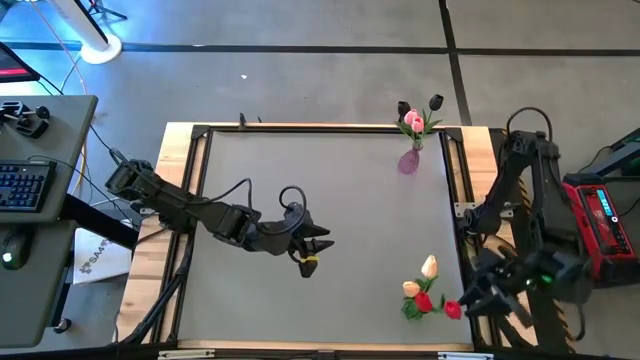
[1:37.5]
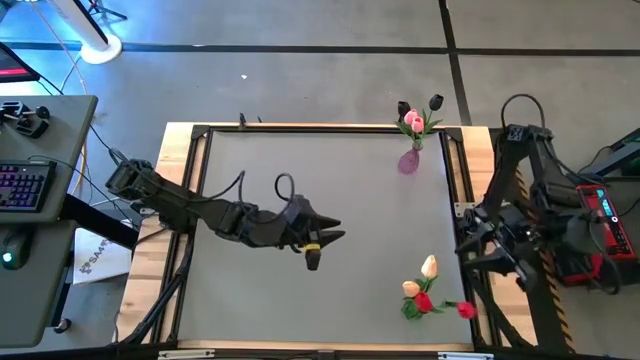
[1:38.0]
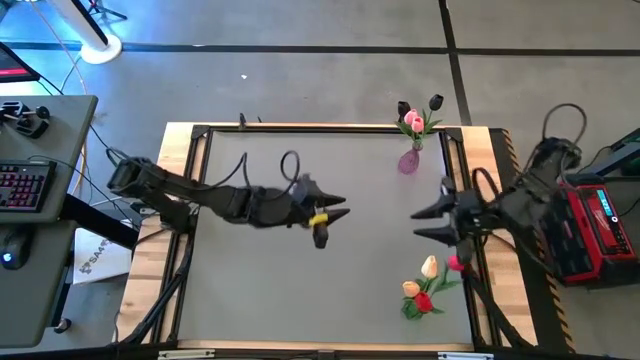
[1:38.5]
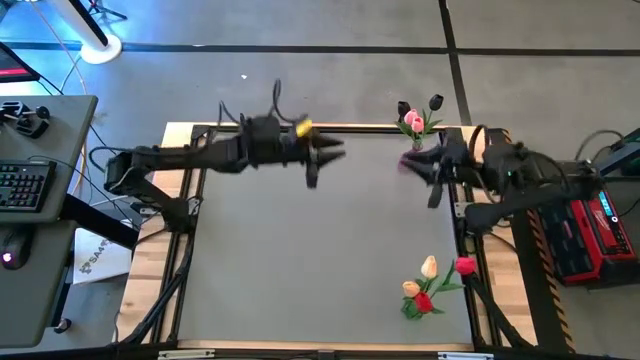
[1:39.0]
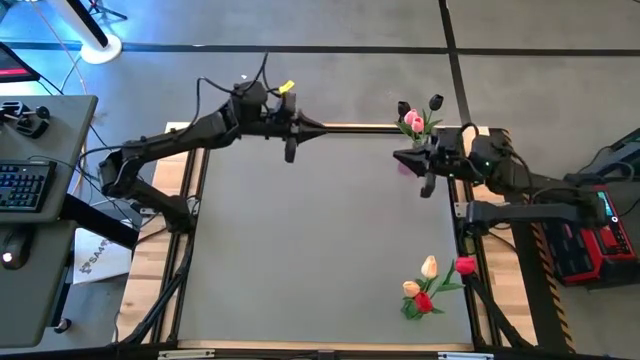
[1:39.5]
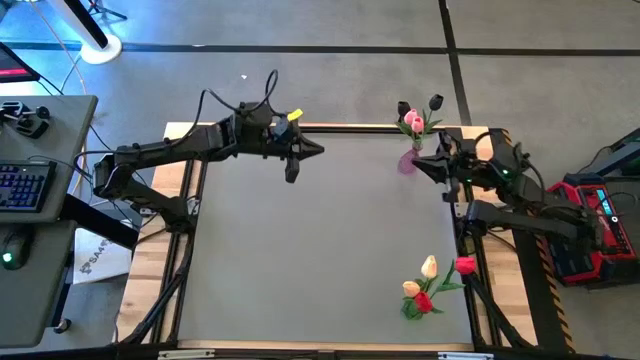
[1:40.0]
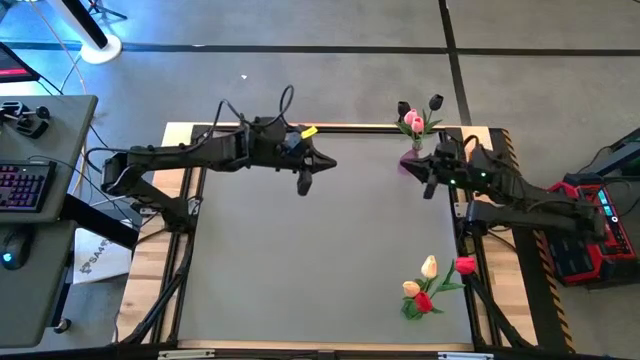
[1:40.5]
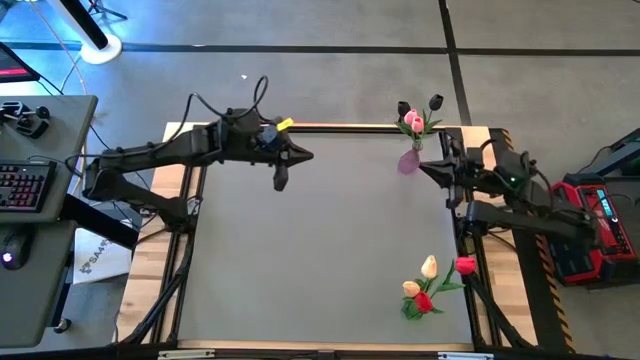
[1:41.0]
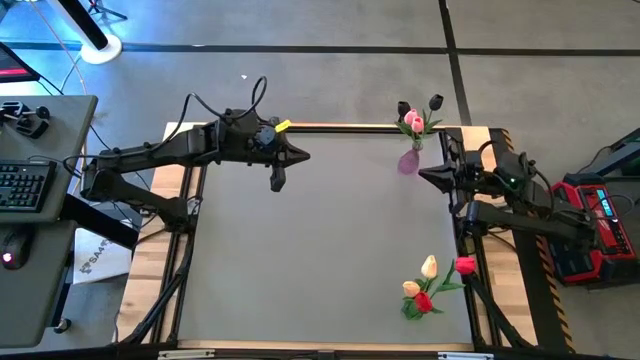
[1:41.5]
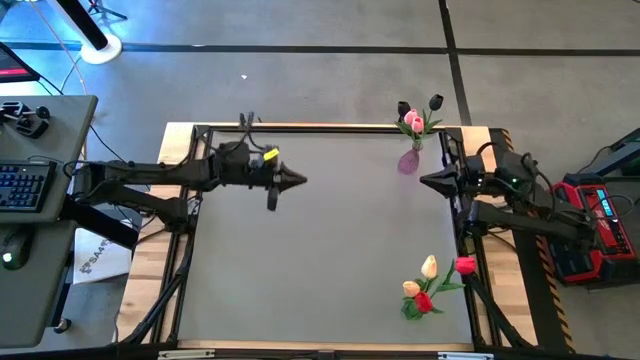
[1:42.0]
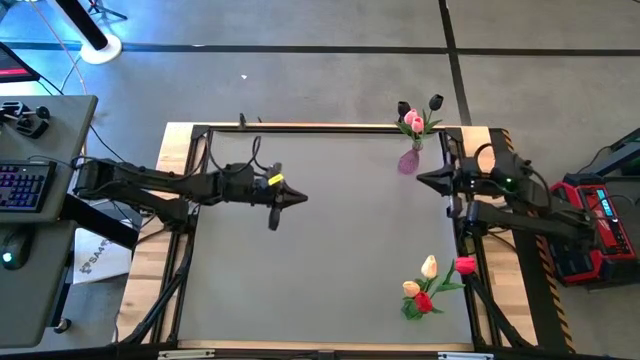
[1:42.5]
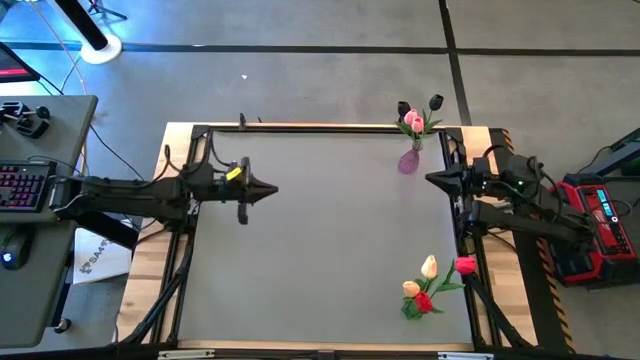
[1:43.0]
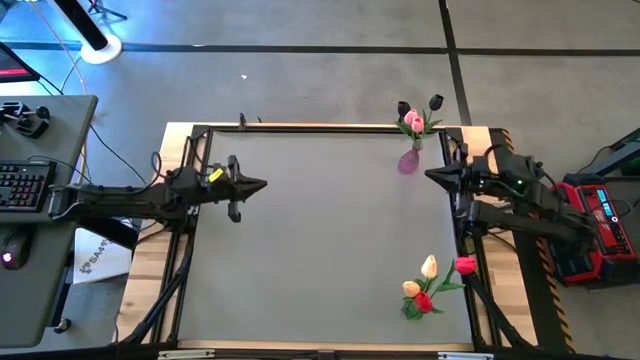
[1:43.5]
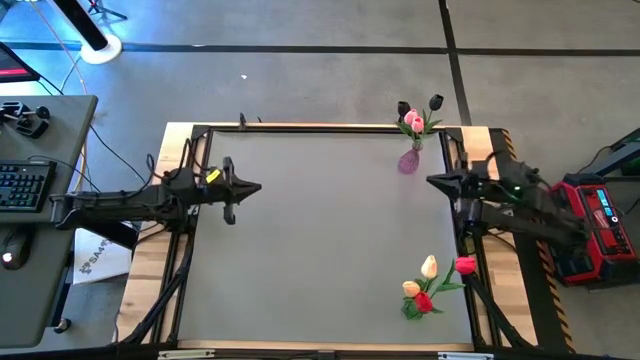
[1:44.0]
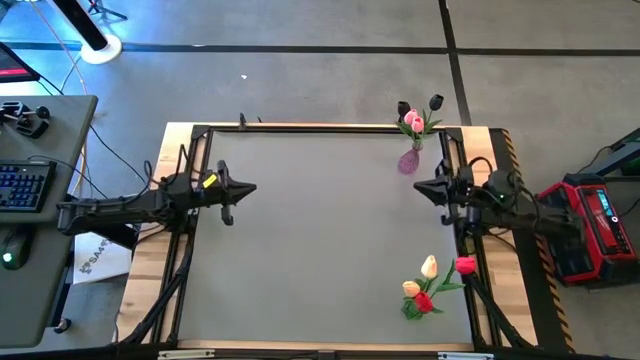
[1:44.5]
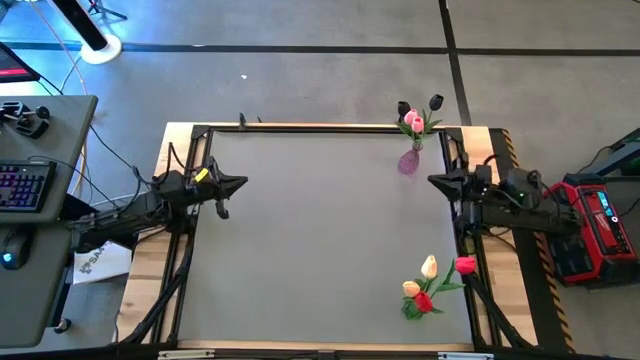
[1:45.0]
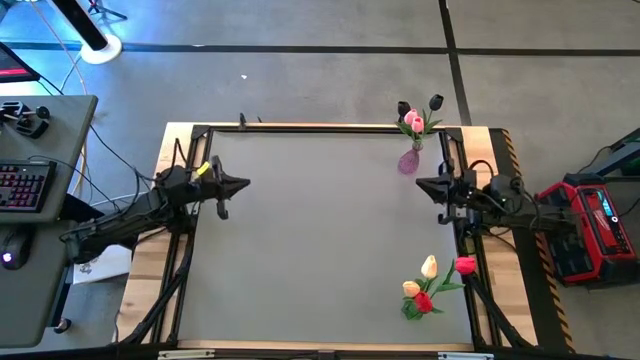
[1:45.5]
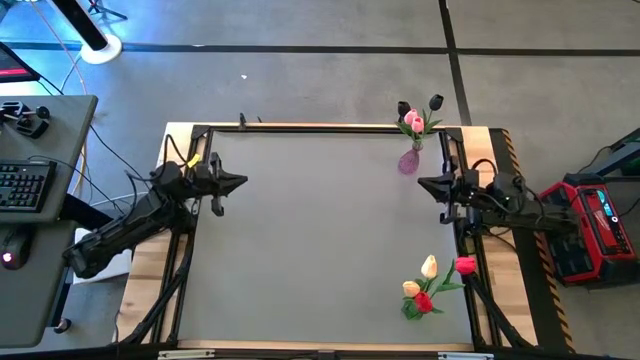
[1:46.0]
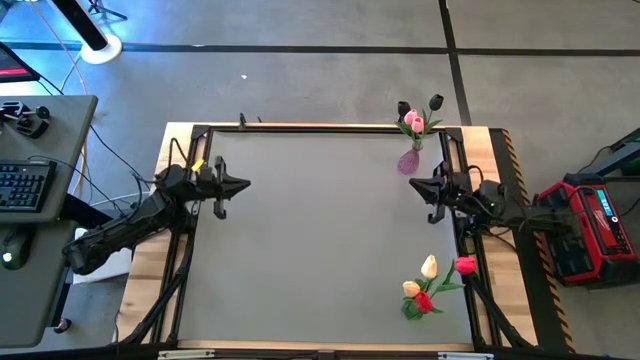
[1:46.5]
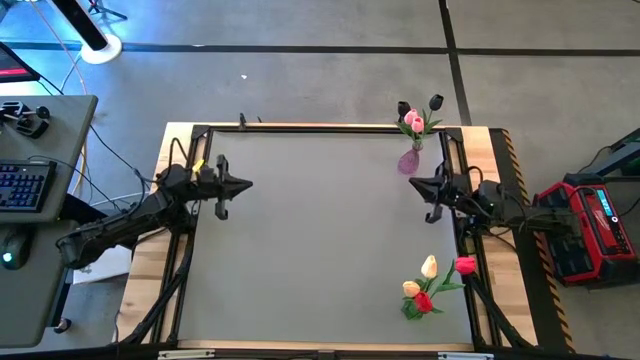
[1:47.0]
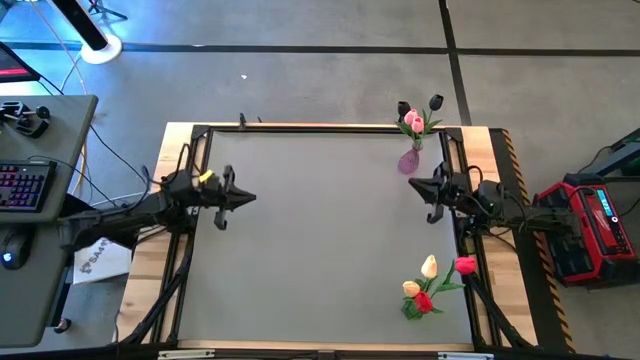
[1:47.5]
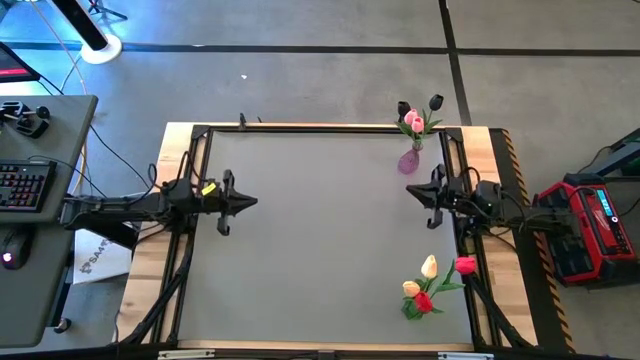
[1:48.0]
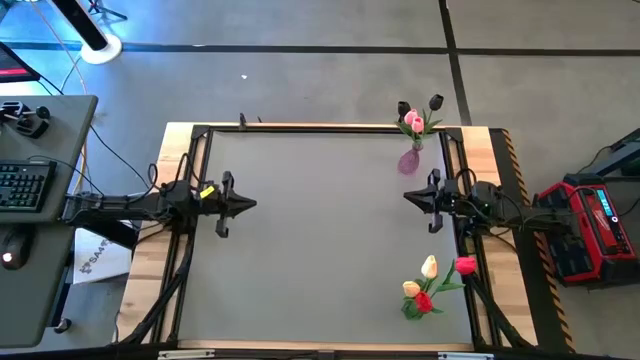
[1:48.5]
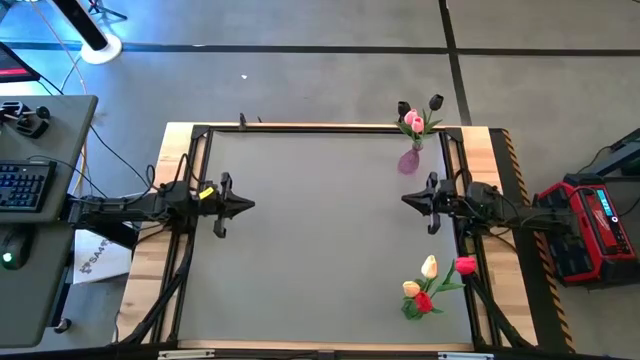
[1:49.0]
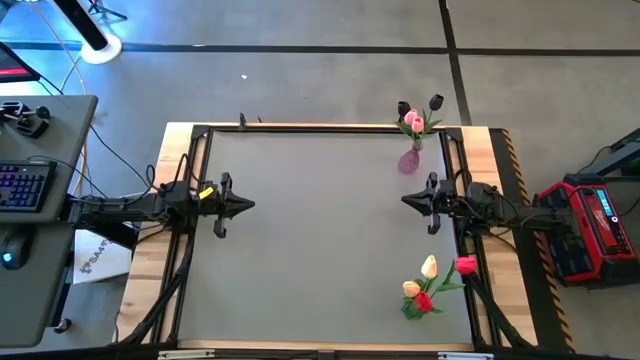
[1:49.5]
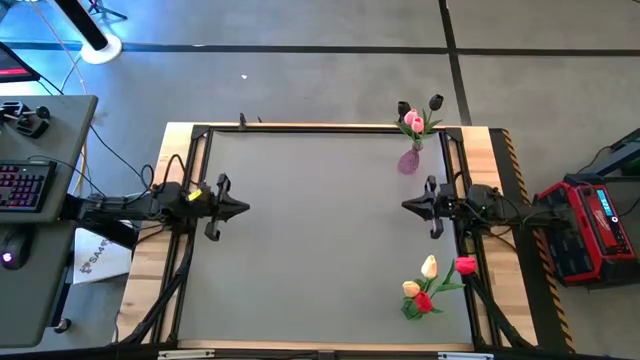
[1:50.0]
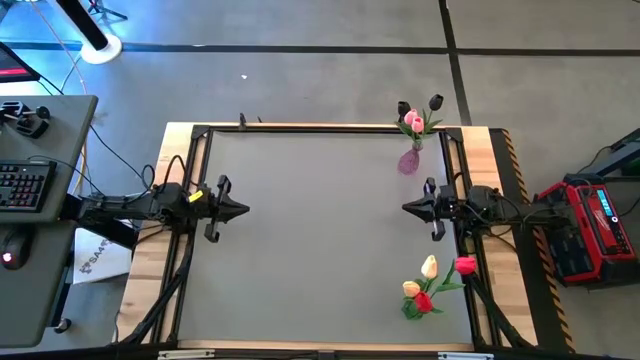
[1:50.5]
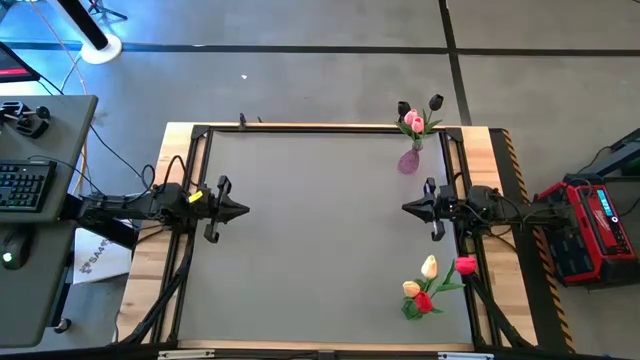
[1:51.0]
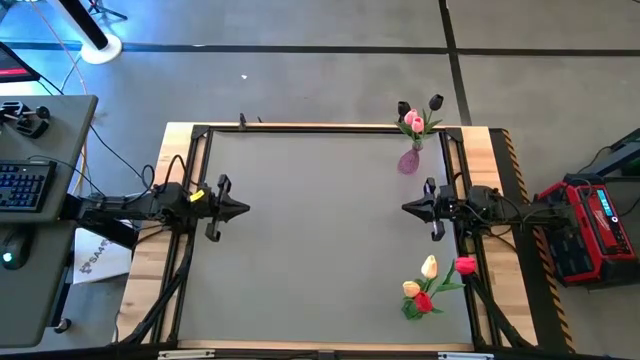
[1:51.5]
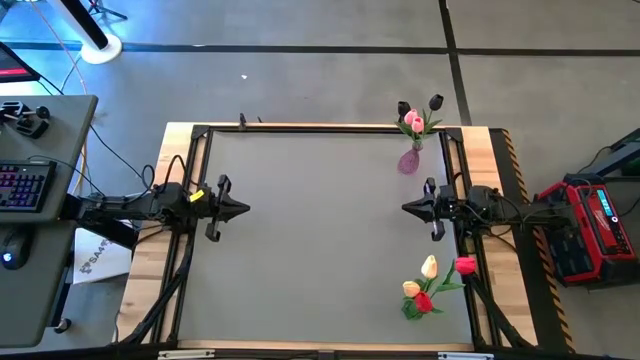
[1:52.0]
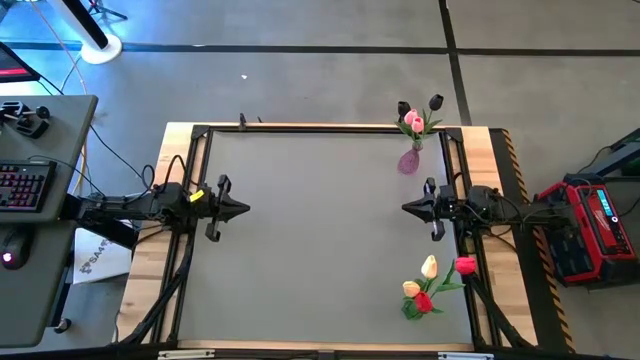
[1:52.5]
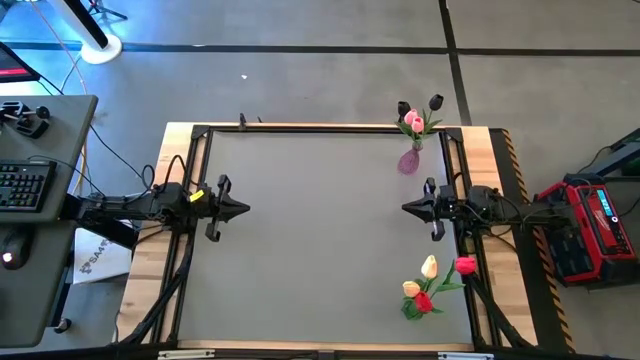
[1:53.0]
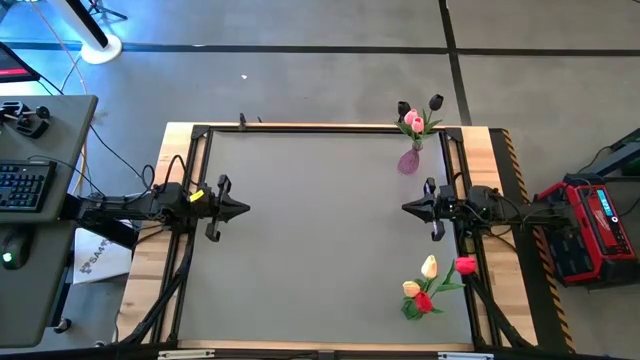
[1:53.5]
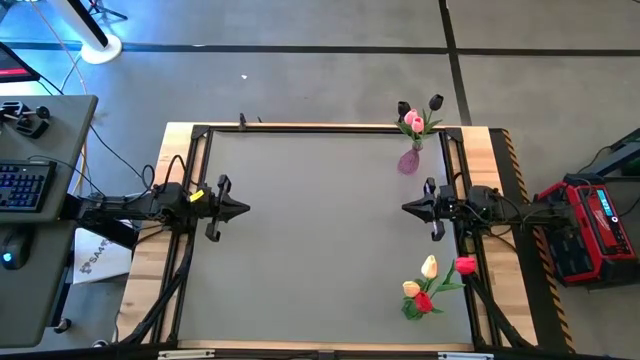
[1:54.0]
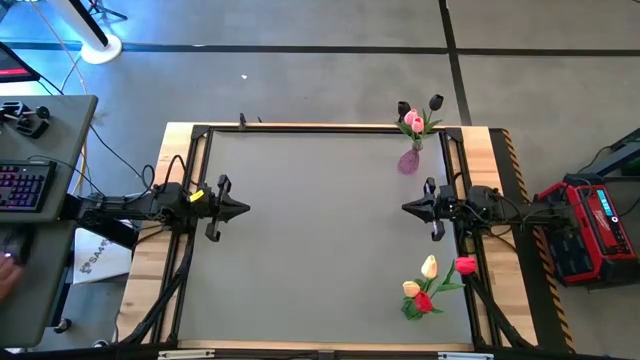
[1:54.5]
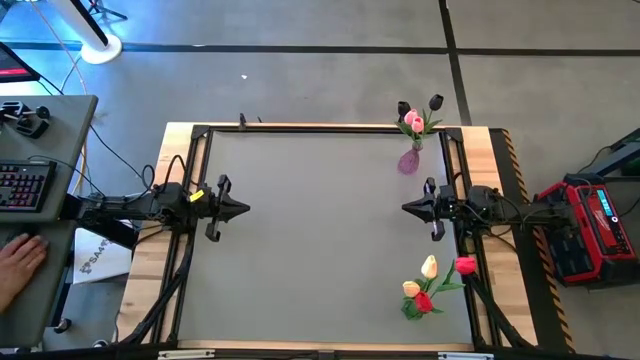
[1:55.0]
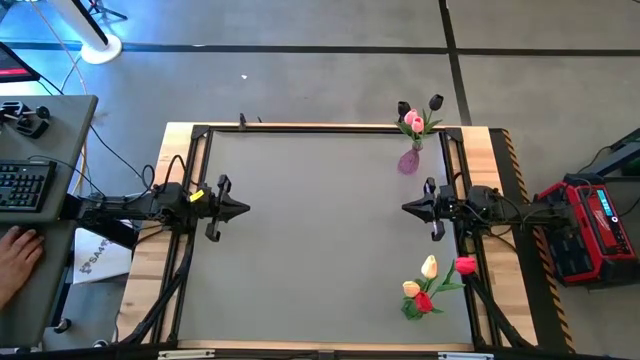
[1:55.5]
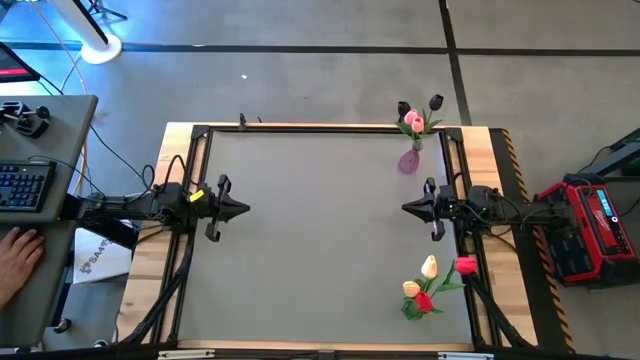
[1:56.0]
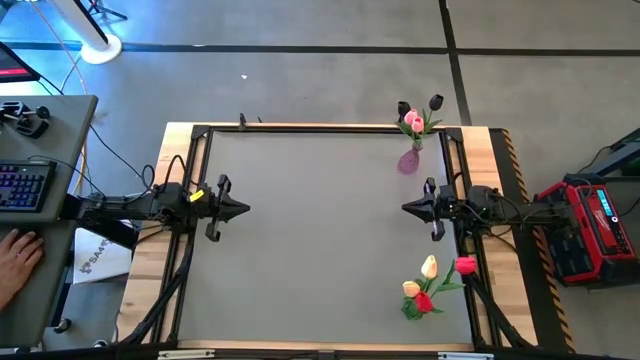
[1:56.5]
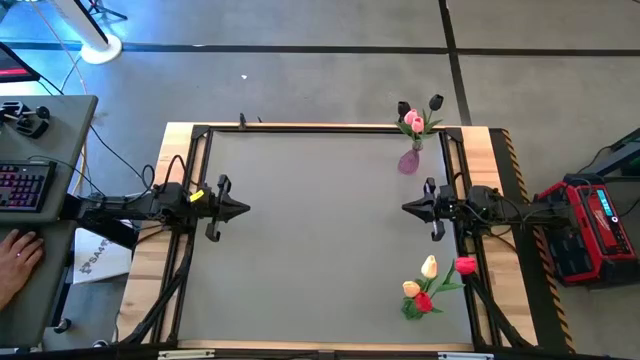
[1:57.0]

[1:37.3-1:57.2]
Task: Sort flowers into vase by color
Return to Home Position

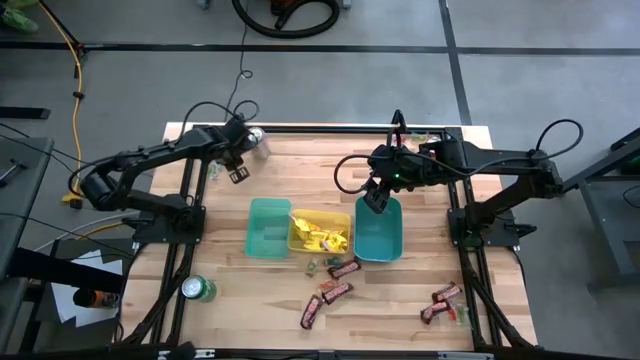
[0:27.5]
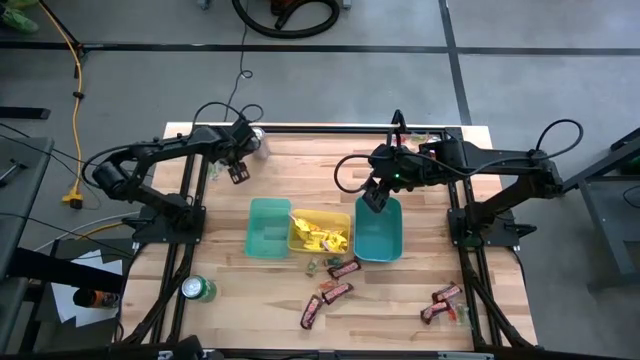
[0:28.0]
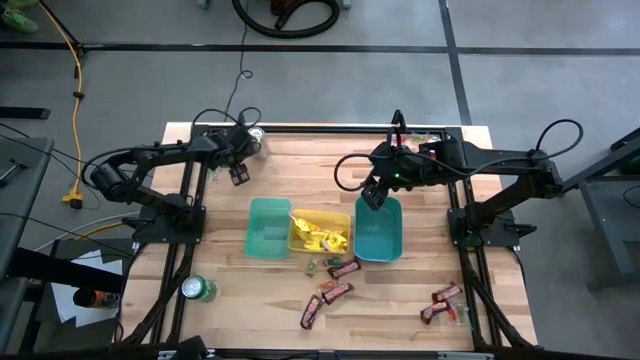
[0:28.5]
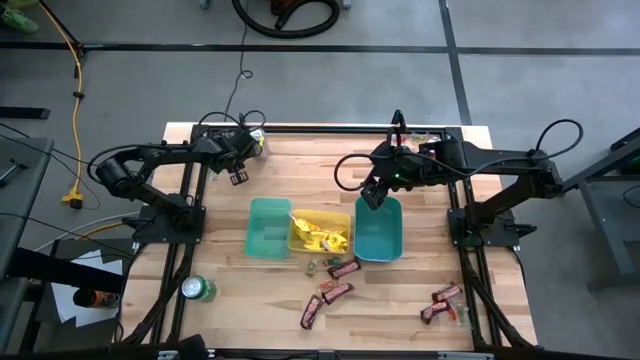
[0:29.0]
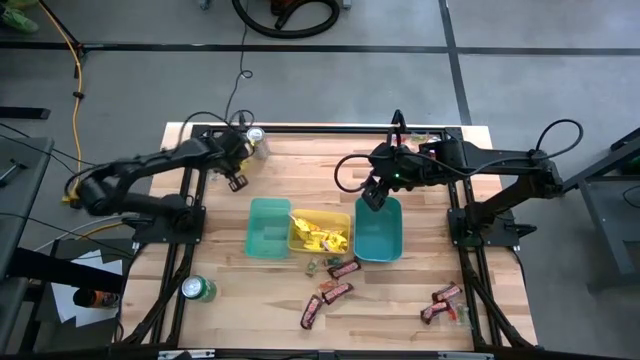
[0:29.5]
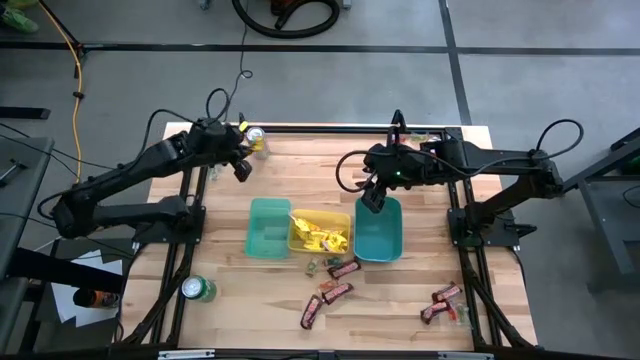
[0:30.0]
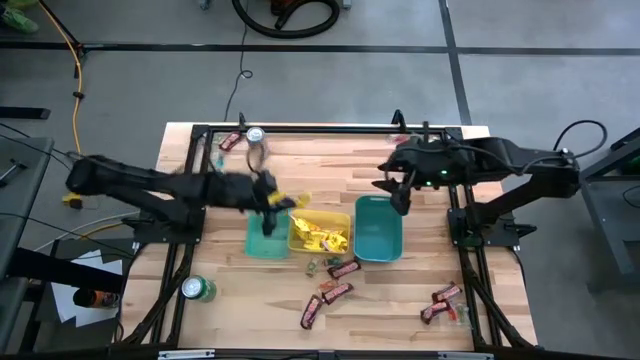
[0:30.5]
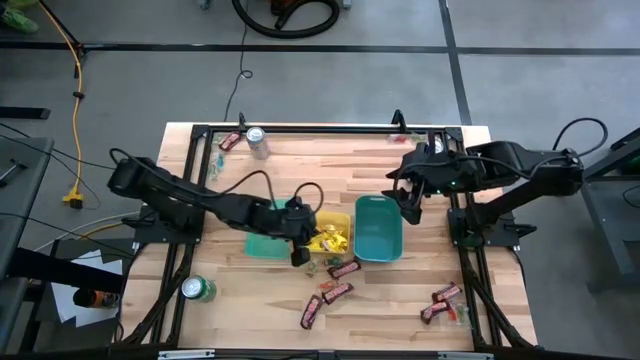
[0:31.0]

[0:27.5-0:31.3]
Task: Sort candy
Put the yellow candy into the yellow bin
